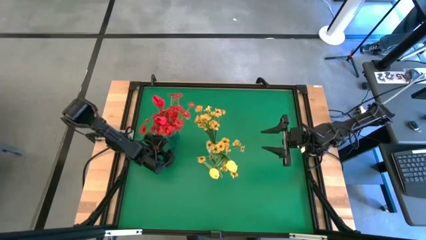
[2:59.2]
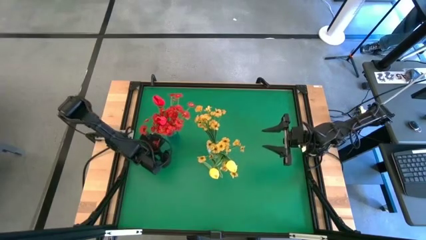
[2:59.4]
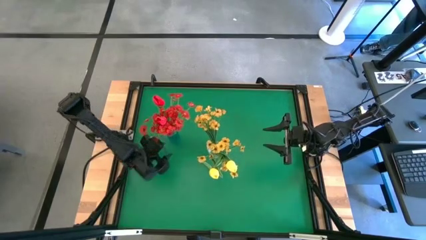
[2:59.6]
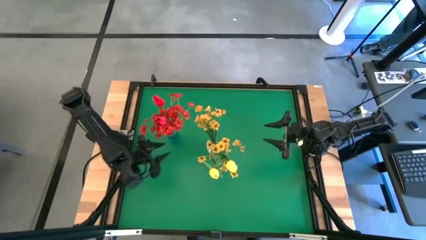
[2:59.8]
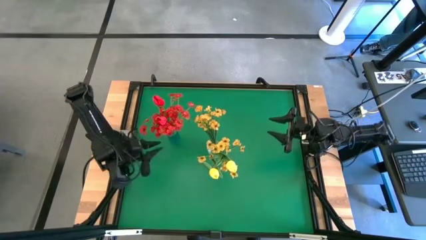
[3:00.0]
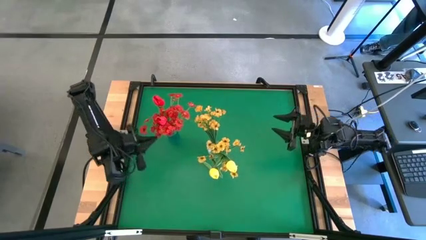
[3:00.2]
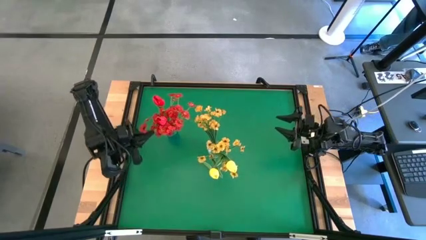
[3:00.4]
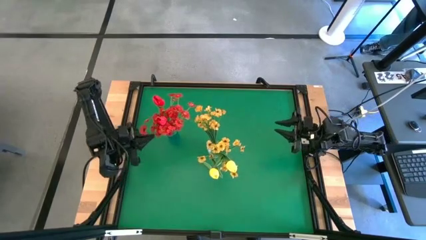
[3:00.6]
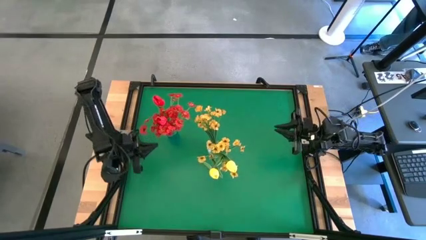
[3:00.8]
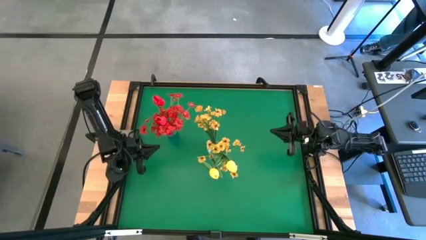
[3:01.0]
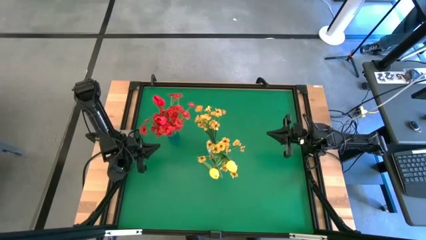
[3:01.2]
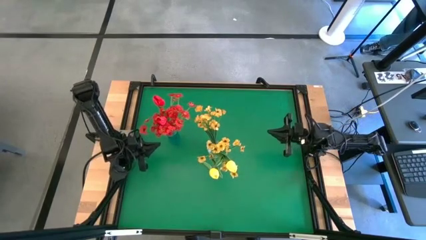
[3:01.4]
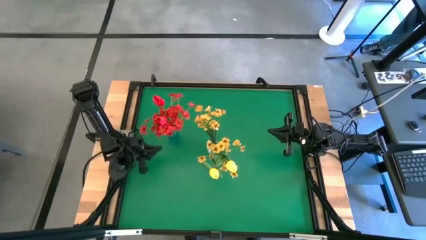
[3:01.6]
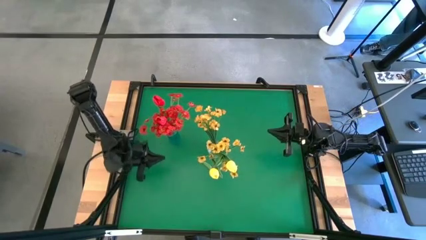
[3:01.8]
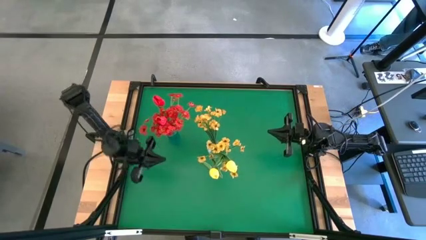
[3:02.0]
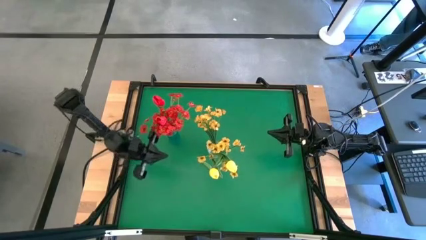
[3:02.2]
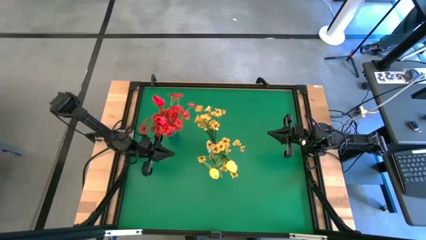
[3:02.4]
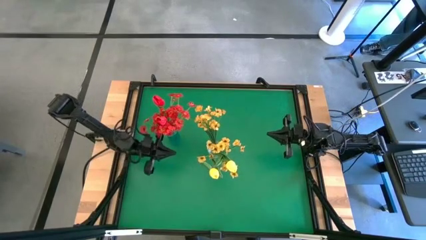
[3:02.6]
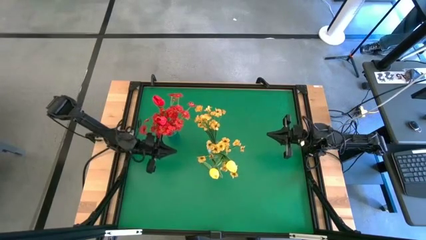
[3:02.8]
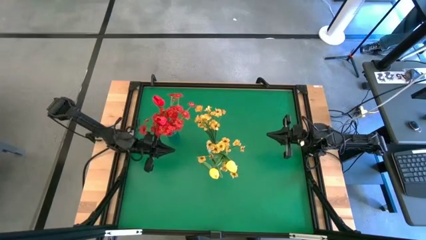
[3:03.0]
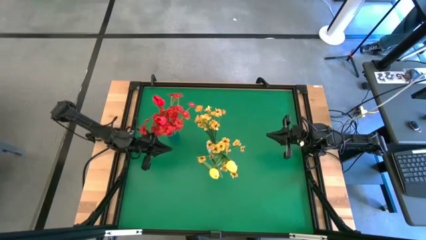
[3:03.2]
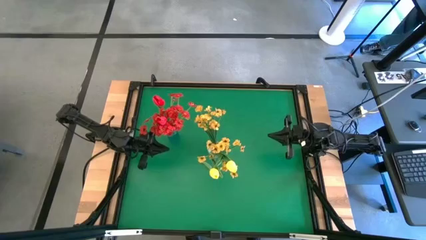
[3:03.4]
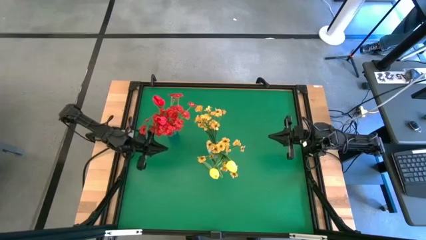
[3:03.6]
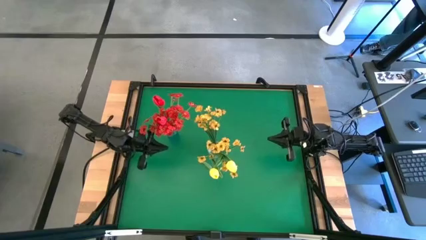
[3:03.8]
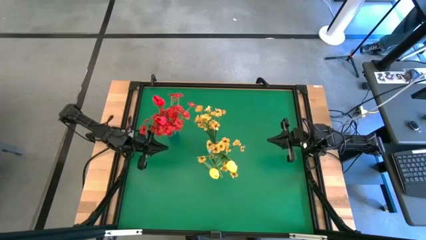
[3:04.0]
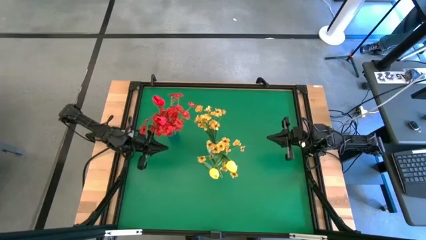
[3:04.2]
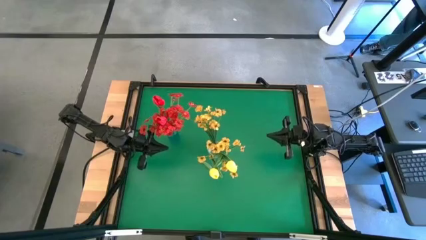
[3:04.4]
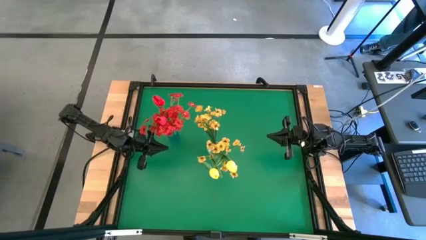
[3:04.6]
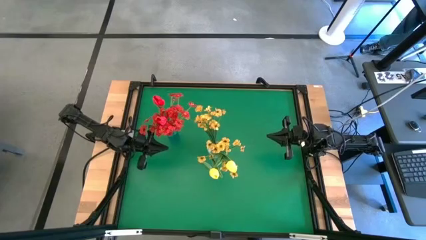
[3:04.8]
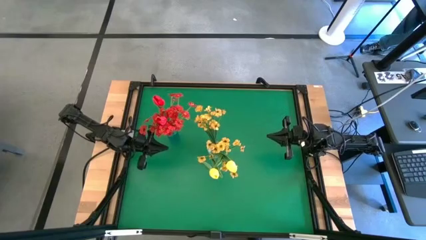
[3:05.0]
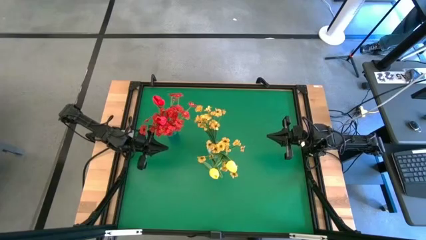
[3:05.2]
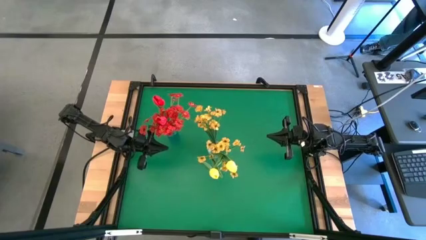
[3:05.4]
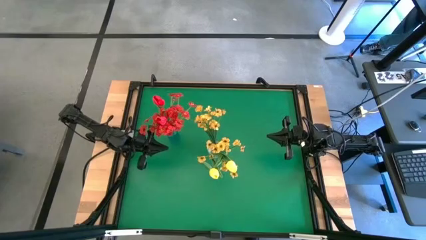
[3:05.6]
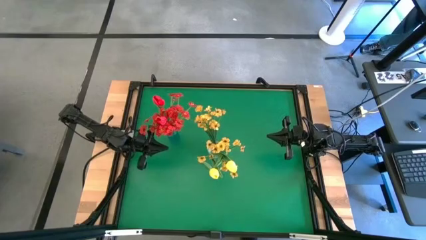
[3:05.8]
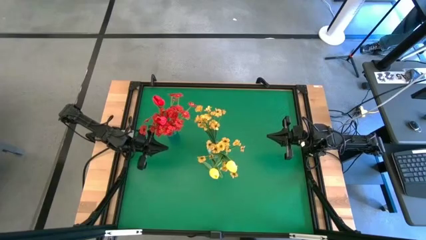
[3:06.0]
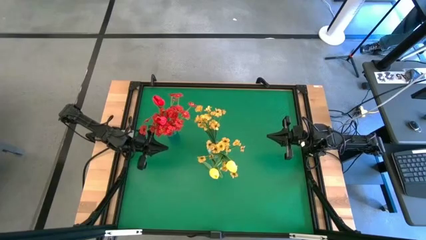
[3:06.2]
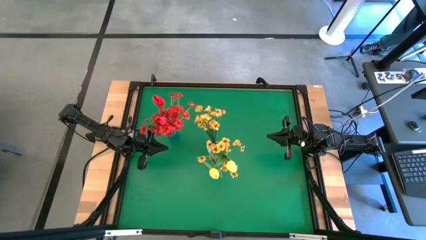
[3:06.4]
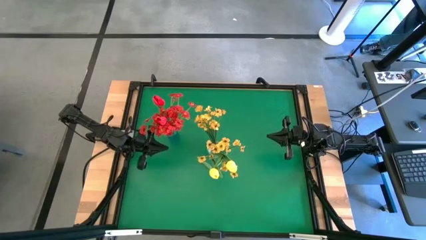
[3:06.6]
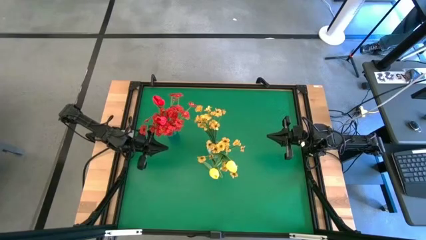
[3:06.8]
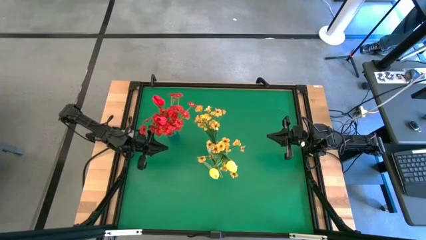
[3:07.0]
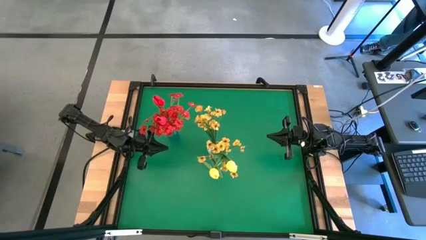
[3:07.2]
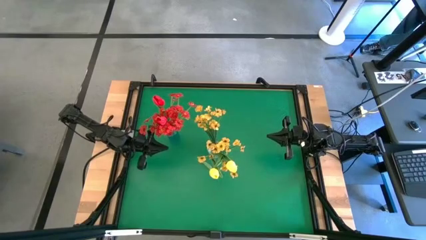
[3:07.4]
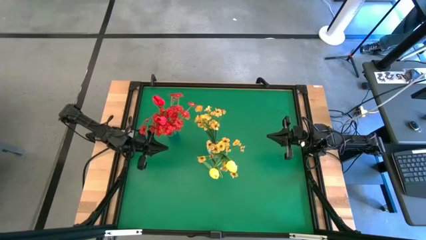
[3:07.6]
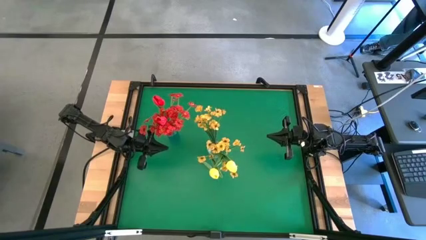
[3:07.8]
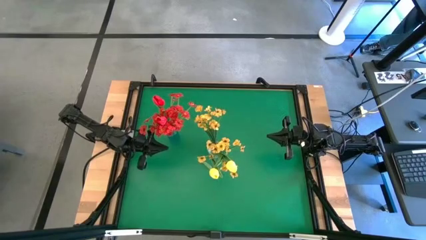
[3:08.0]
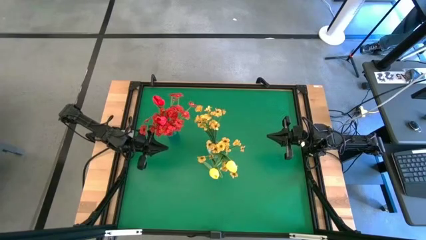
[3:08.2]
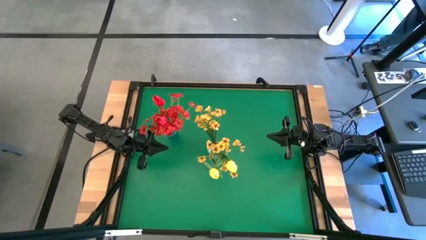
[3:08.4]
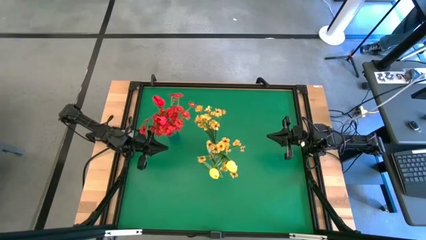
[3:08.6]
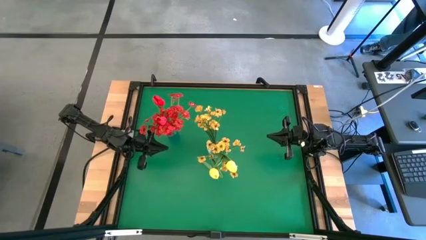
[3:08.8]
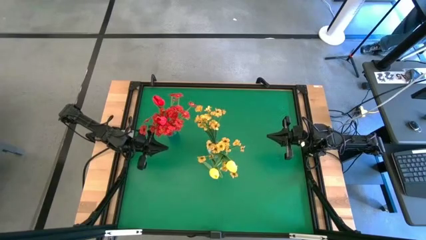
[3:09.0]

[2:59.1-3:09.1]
Task: Sort flowers into vase by color
Return to Home Position

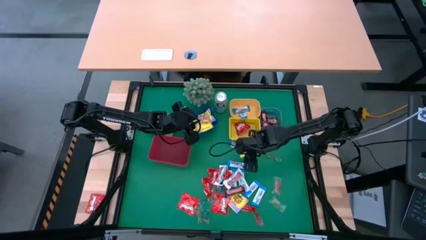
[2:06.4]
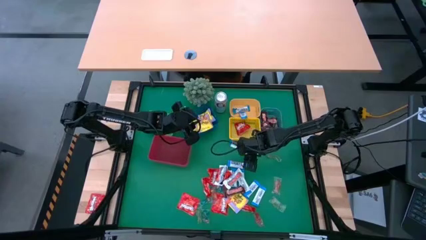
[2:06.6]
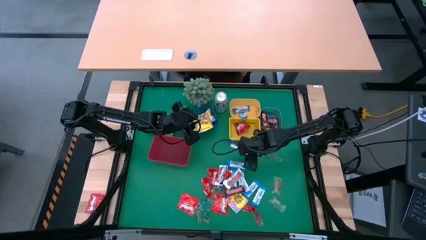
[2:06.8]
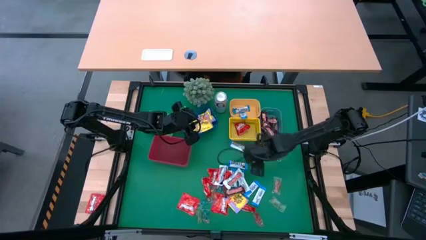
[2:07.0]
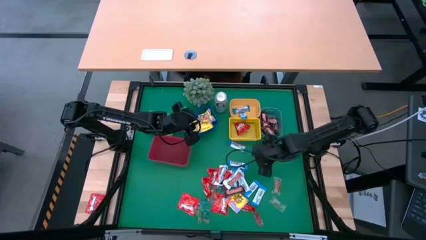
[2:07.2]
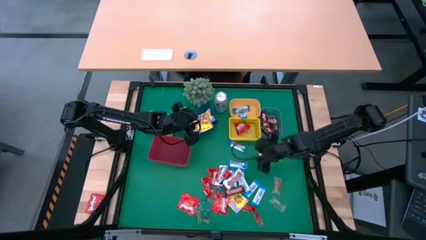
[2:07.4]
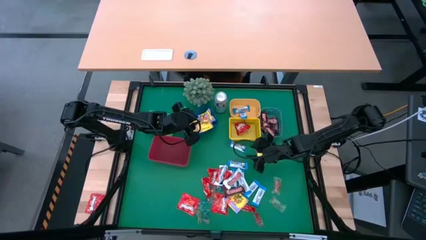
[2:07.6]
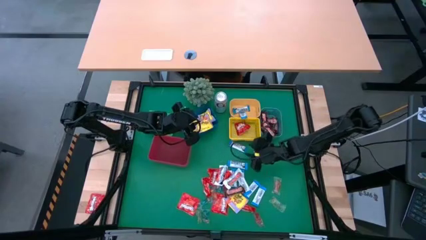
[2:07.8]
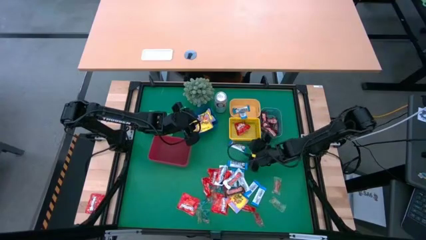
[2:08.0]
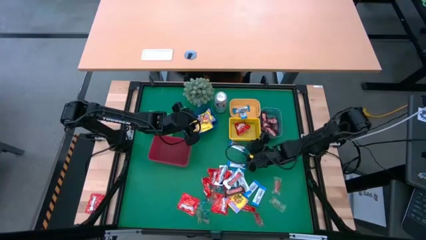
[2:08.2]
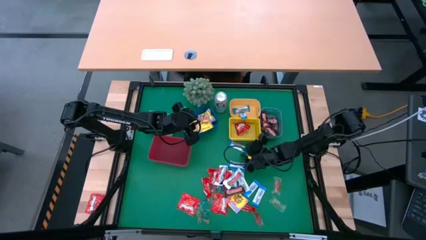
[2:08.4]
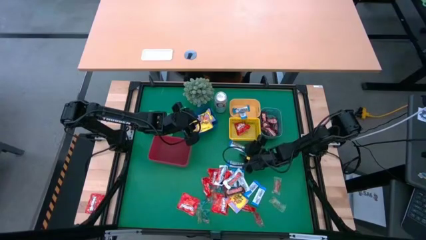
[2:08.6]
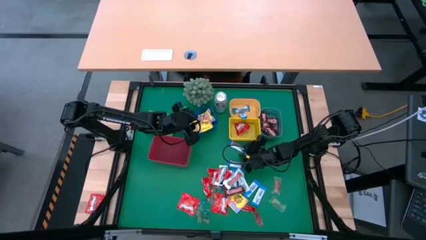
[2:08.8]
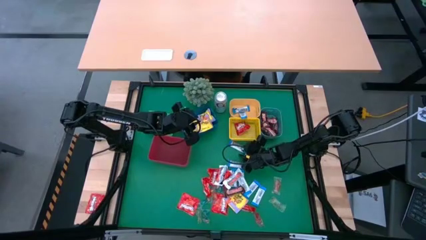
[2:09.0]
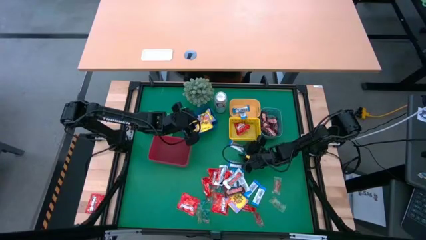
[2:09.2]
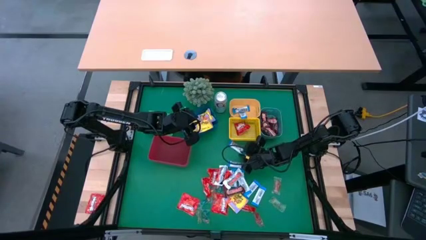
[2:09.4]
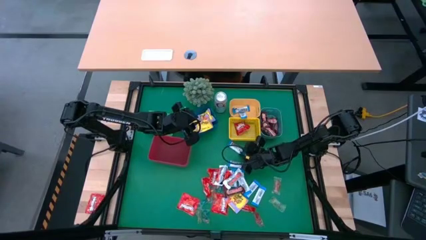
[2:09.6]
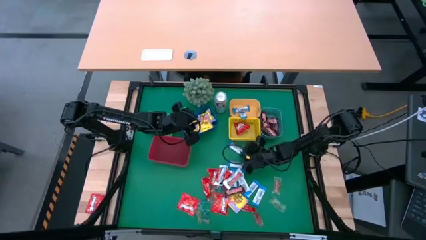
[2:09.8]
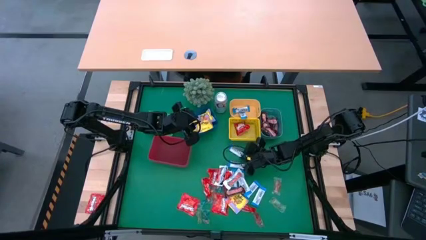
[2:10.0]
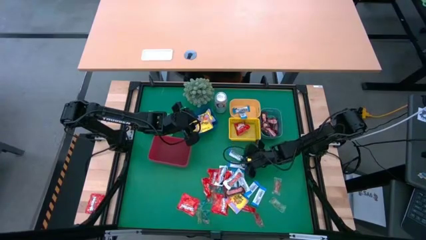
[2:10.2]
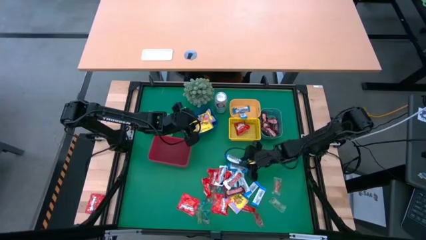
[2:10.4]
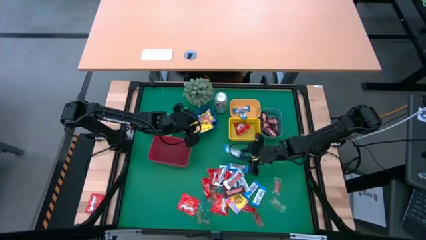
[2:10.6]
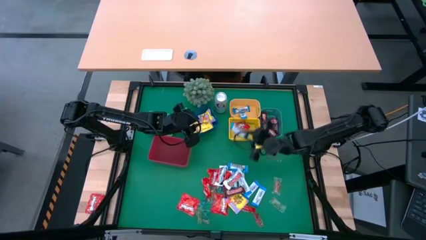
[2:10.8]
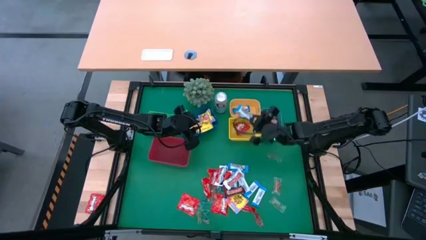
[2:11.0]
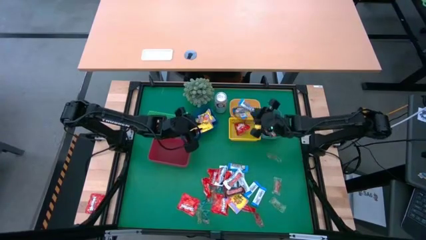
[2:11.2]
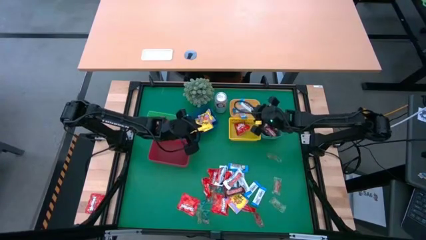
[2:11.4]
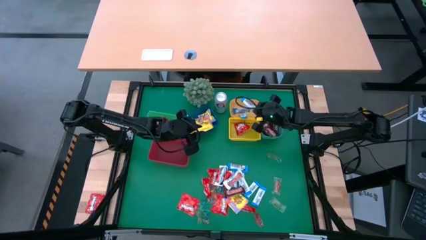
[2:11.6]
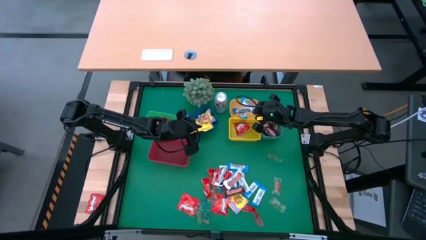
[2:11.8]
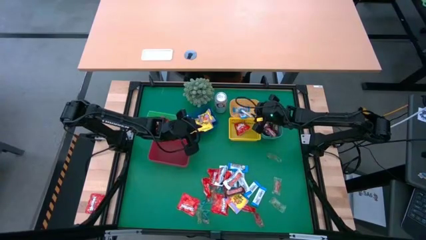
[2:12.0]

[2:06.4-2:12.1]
Task: Sort candy
Put the blue chocolate bar into the orange bin
